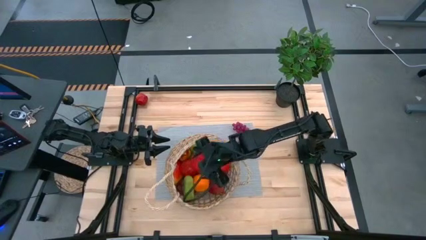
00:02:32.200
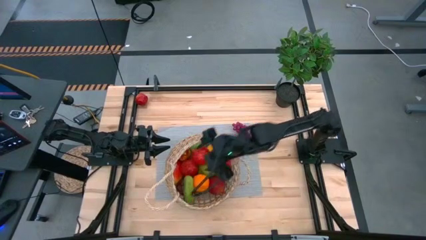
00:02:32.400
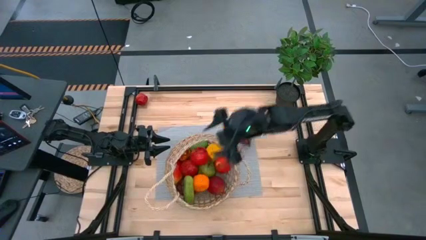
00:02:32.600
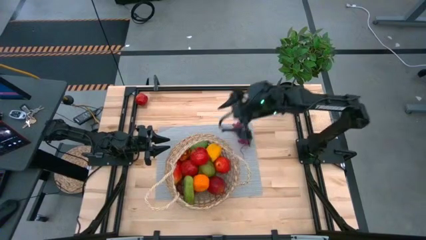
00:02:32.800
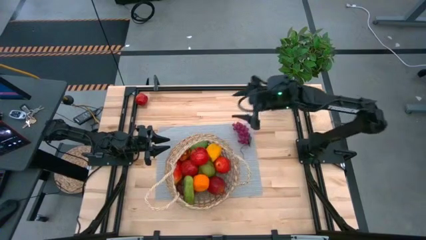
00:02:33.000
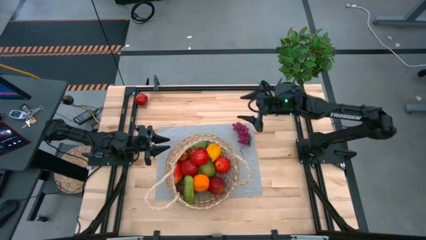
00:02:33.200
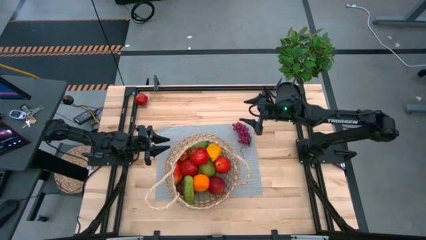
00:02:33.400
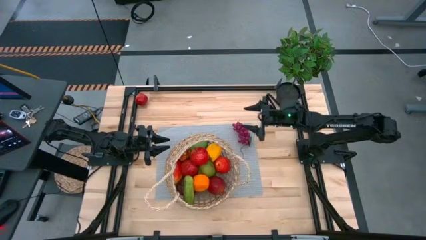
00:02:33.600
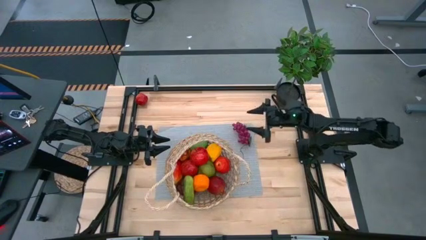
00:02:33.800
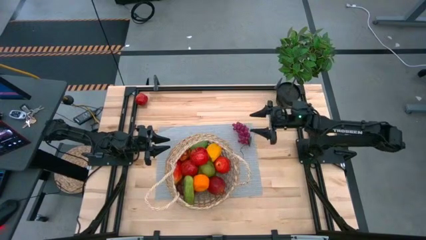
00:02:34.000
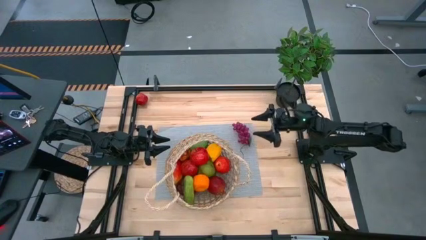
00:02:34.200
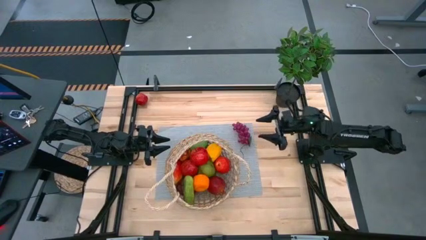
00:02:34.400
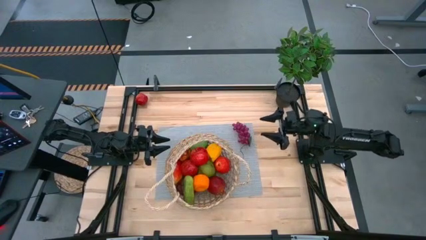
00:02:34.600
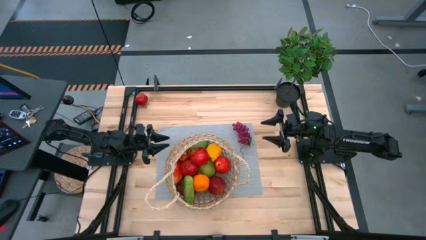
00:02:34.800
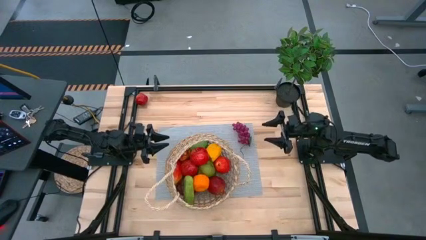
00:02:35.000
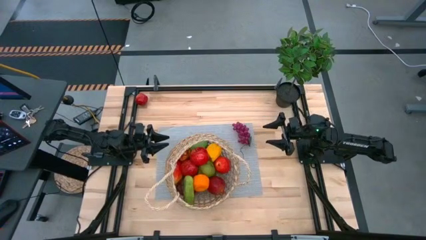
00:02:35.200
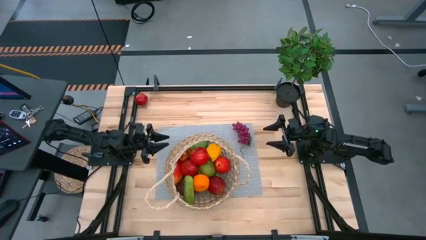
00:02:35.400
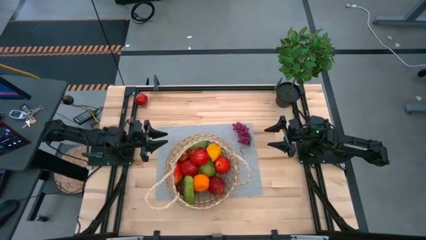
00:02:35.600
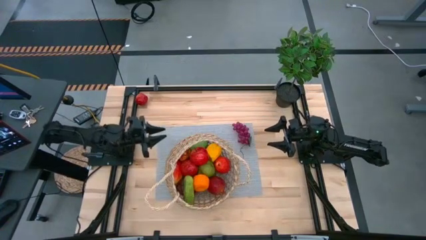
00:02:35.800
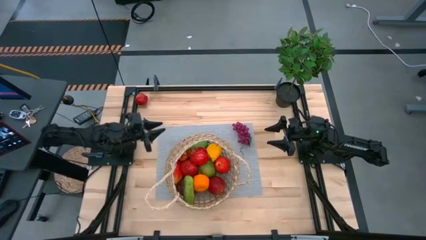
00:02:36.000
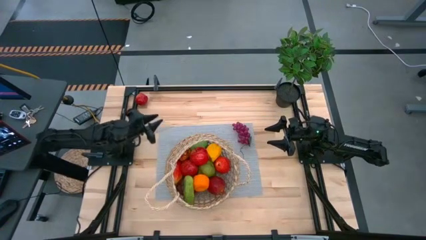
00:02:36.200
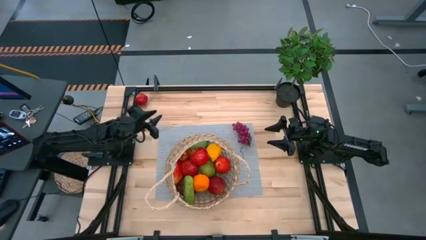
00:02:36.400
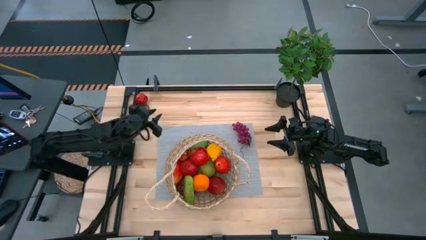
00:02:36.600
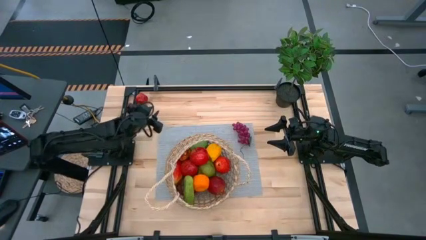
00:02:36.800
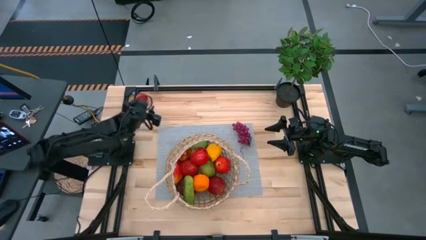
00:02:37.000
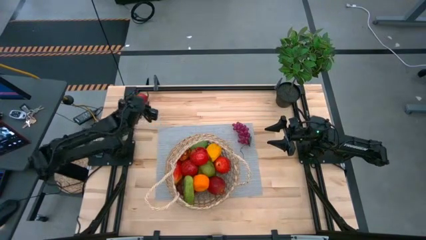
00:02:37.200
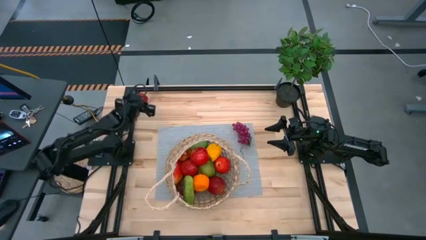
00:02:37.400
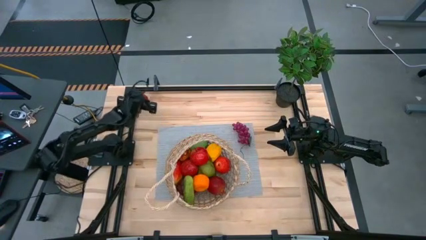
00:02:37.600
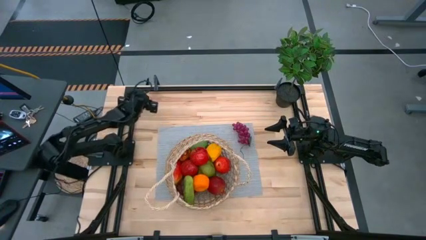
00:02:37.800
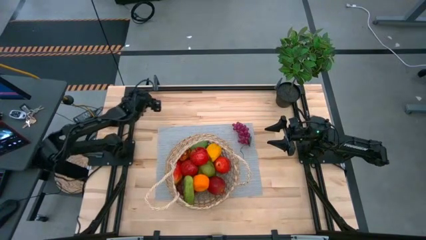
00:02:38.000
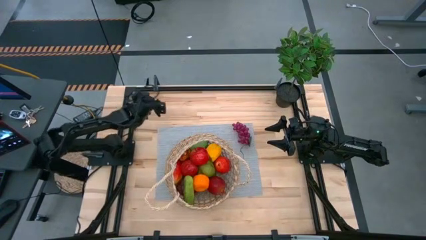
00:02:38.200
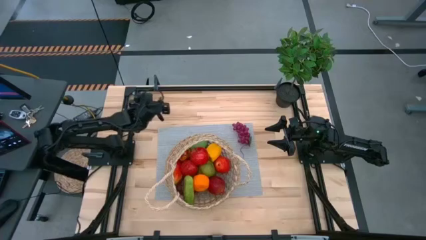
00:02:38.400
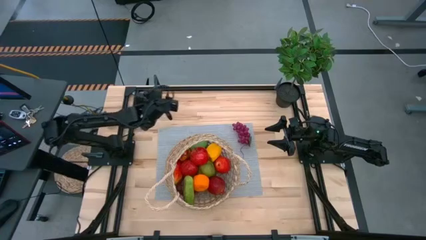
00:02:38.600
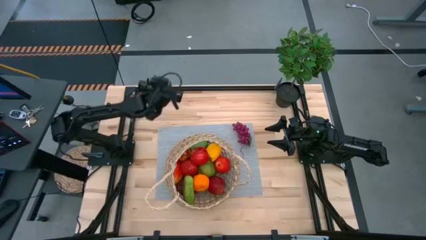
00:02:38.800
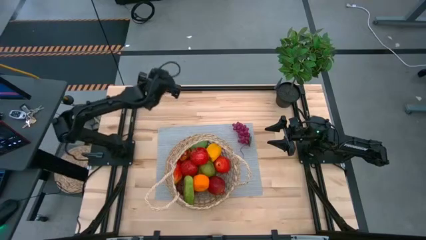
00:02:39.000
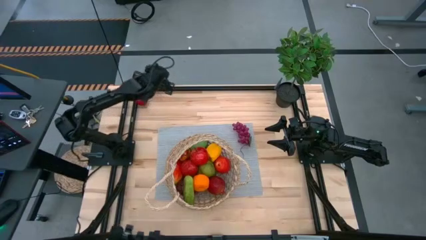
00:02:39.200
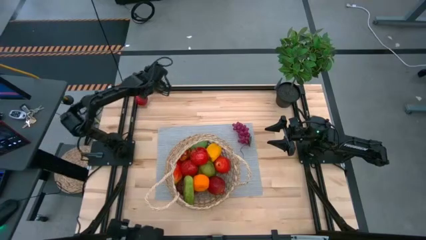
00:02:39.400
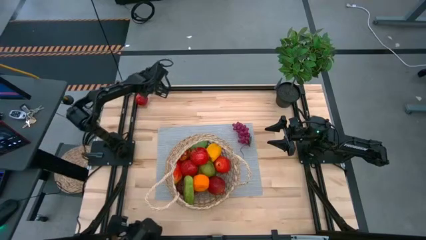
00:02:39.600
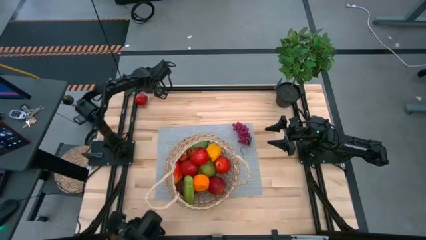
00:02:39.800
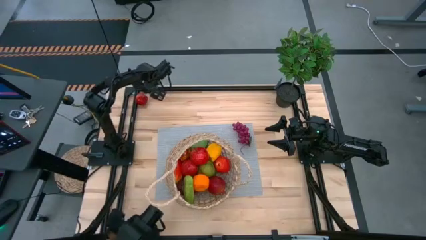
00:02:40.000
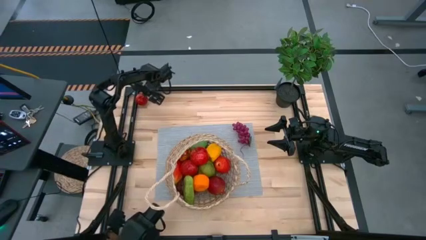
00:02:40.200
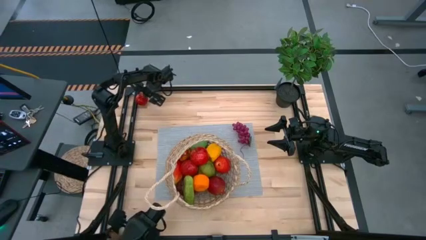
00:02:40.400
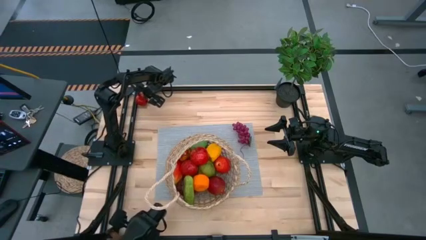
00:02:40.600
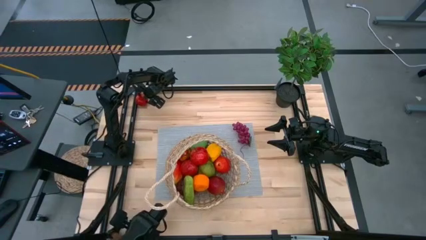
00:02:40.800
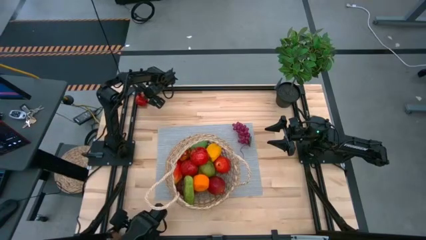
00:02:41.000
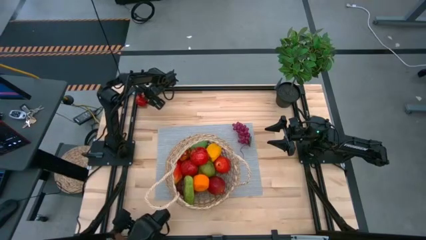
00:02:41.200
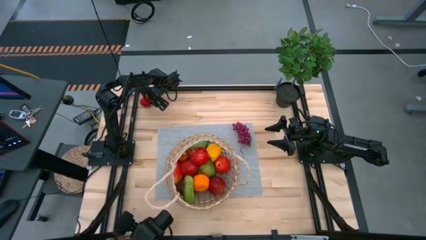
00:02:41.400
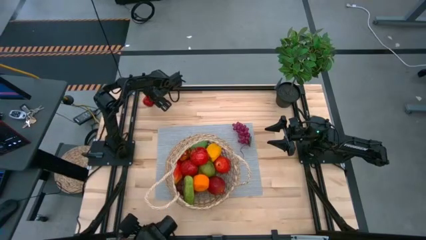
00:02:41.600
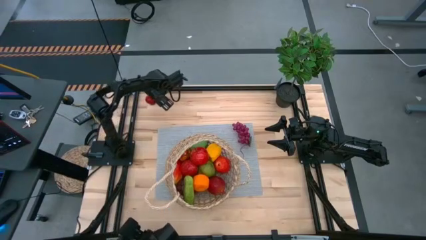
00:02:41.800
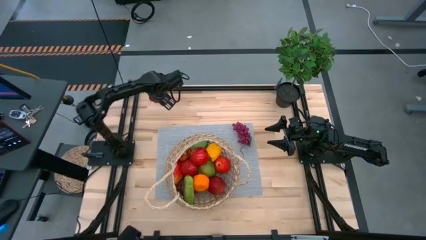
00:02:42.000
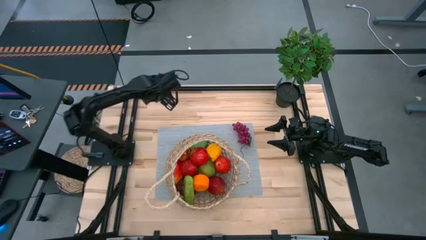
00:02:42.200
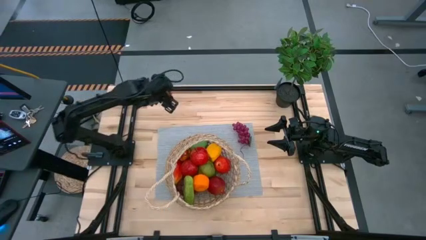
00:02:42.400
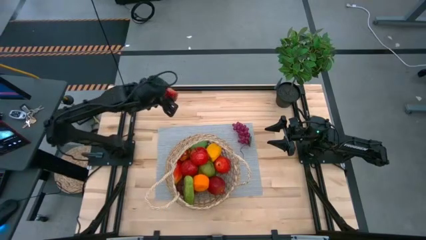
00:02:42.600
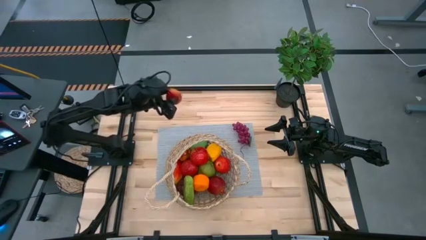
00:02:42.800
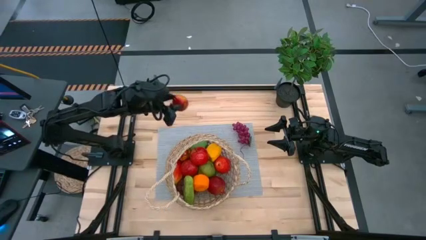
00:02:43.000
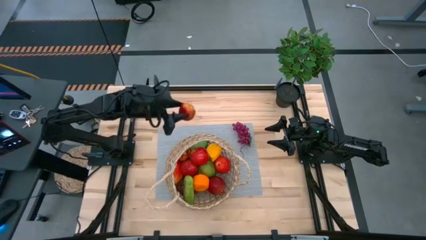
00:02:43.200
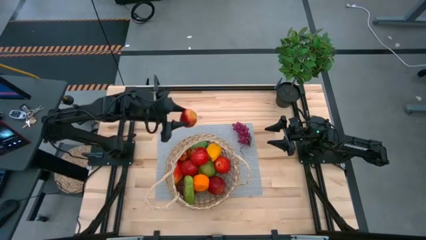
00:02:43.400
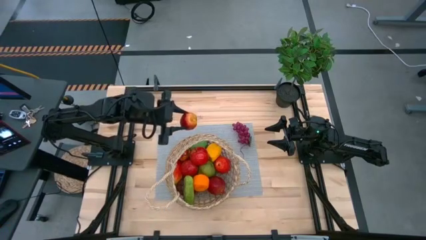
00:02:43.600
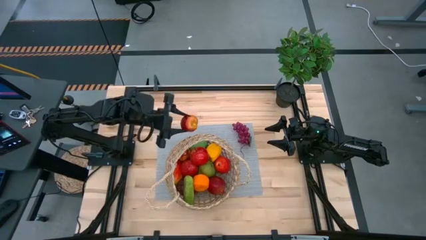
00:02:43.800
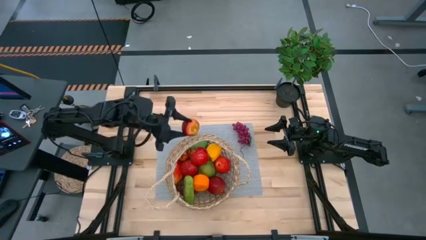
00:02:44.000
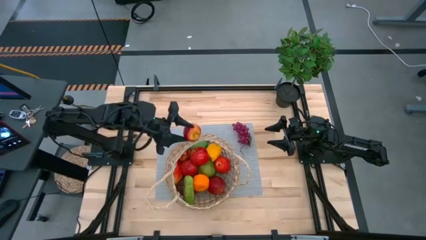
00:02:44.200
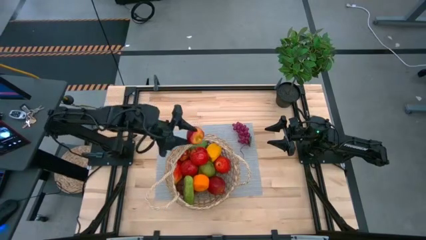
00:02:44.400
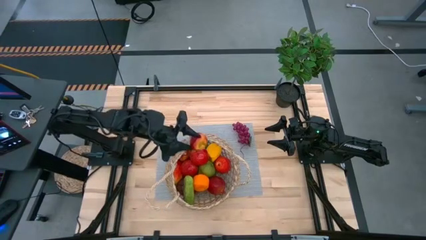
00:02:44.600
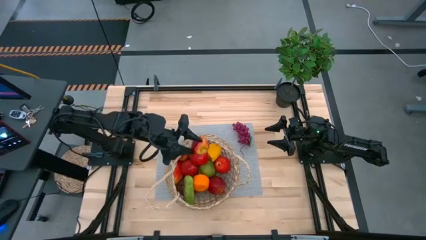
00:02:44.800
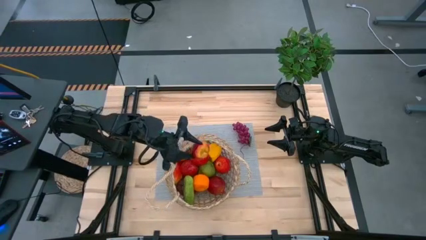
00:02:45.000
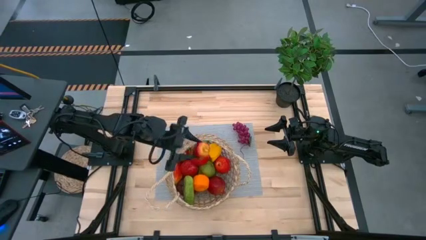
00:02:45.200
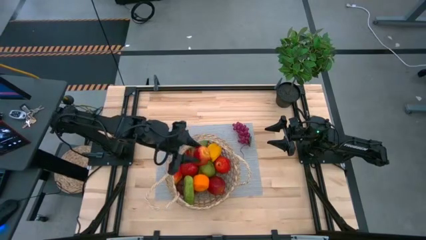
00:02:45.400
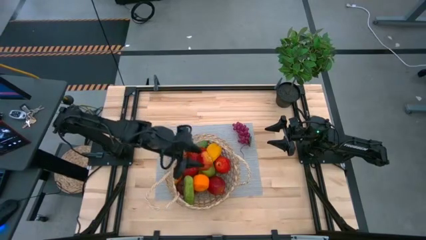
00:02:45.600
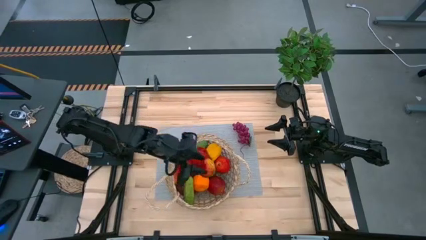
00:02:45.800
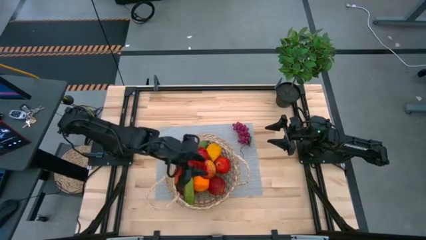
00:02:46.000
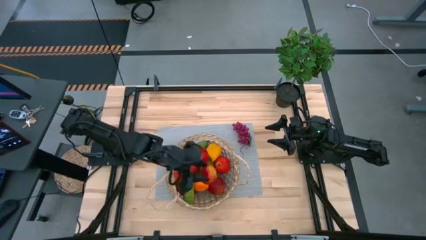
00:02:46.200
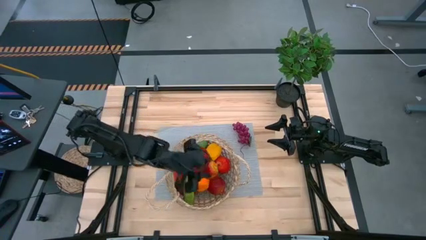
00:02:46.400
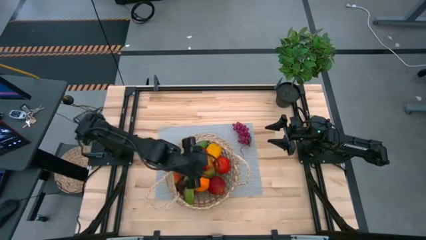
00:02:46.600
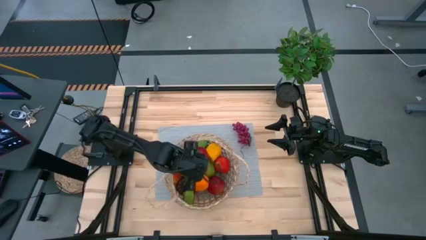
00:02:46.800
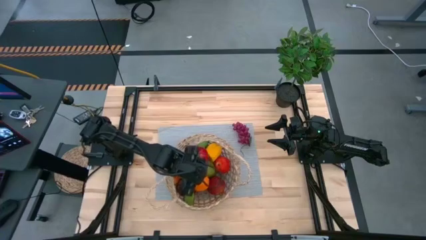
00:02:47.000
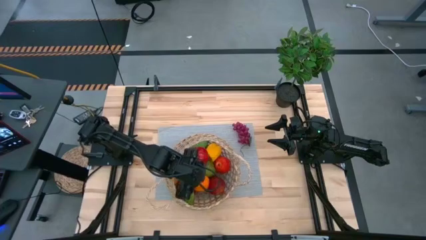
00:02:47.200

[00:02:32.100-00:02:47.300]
Task: Build produce basket
Put the red apple into the brown basket

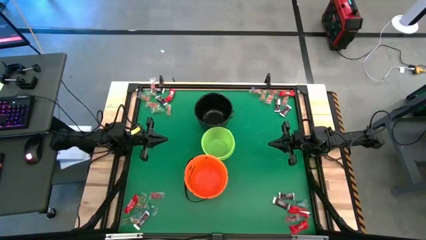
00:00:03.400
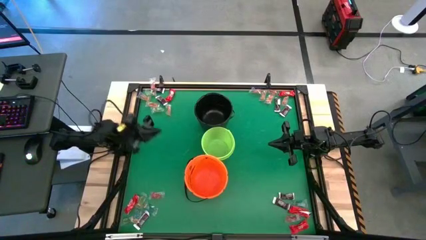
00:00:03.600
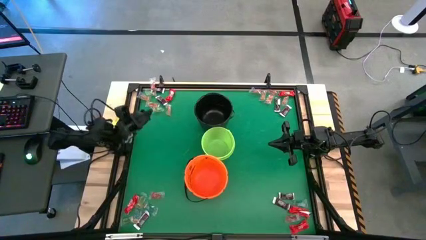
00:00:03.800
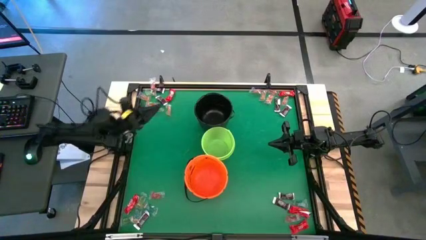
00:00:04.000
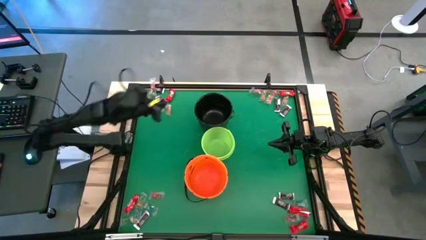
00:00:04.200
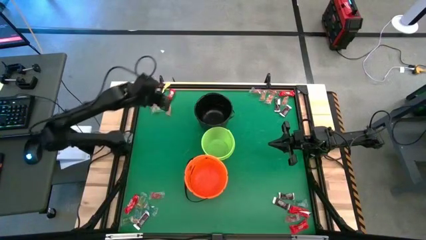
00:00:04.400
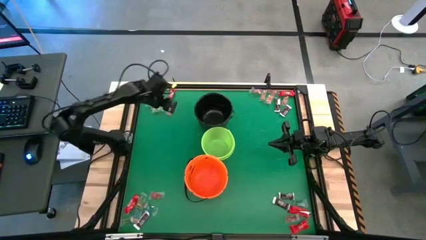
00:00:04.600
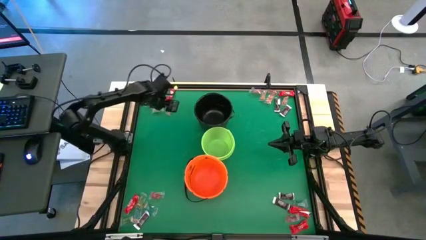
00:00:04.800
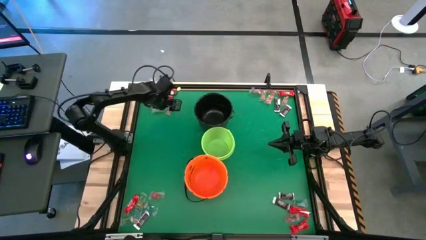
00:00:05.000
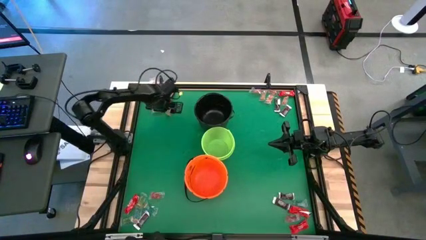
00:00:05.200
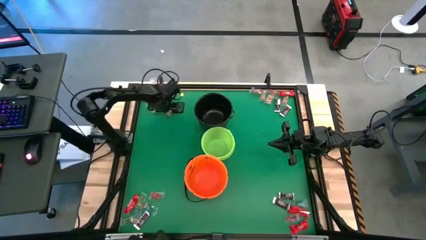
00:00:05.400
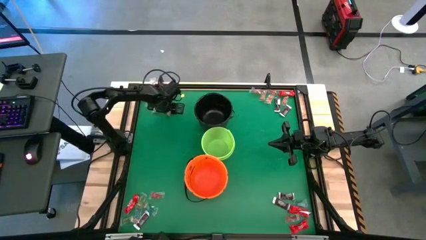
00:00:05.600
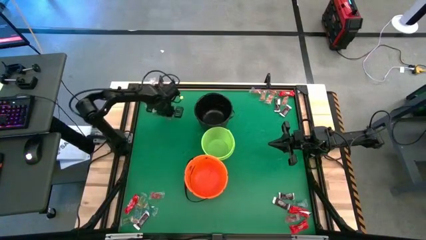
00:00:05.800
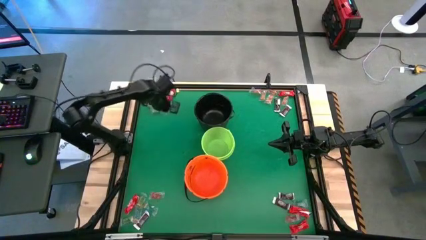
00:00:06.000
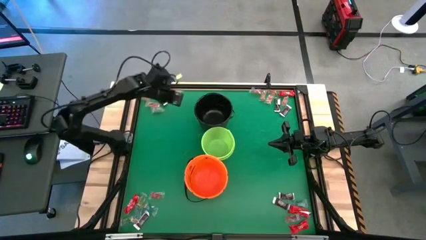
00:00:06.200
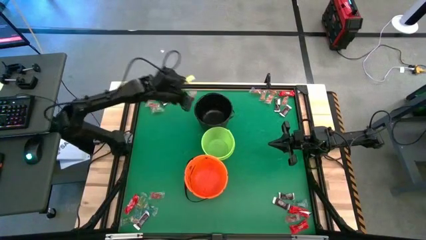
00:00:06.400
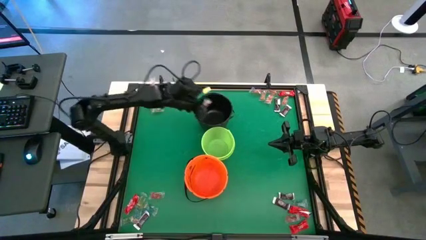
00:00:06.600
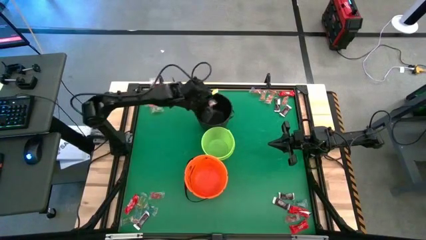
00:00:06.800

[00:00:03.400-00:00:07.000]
Task: Sort candy by brand, put in halloween buckets
Put the red gummy into the black bucket
